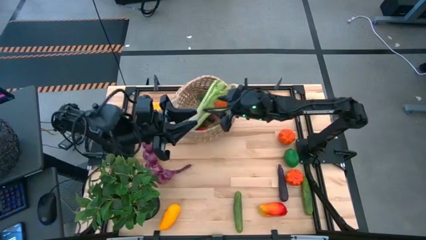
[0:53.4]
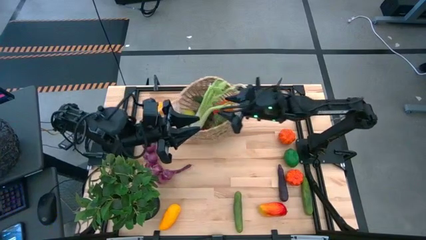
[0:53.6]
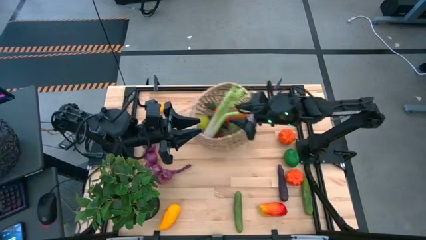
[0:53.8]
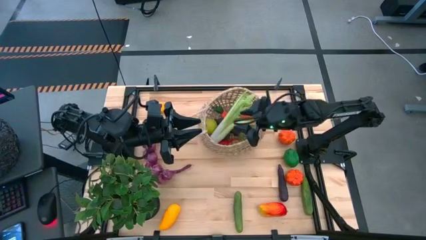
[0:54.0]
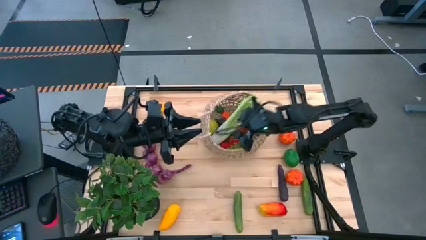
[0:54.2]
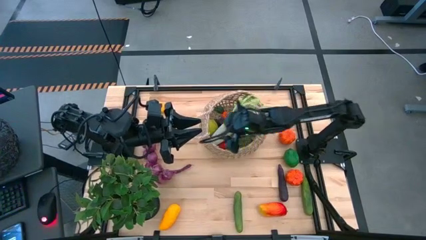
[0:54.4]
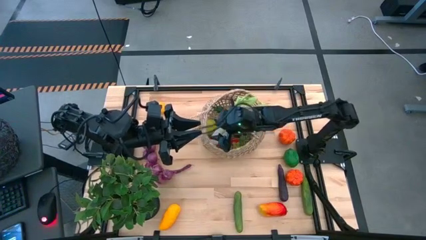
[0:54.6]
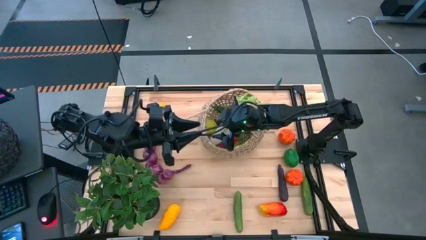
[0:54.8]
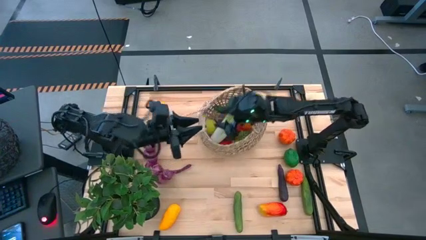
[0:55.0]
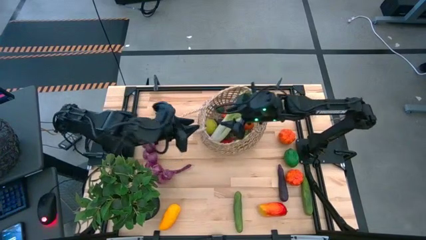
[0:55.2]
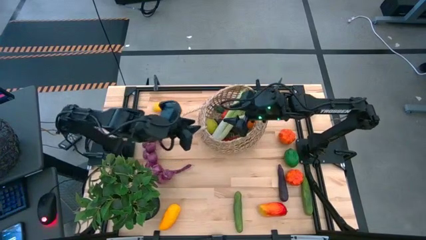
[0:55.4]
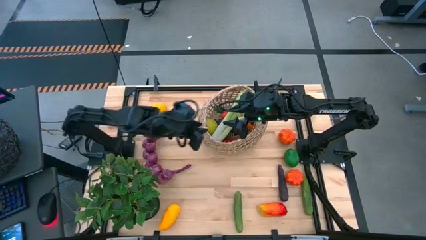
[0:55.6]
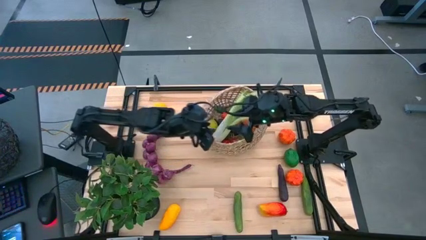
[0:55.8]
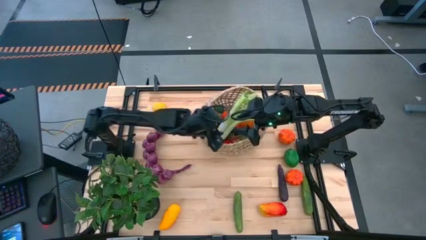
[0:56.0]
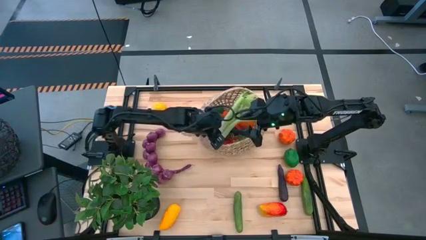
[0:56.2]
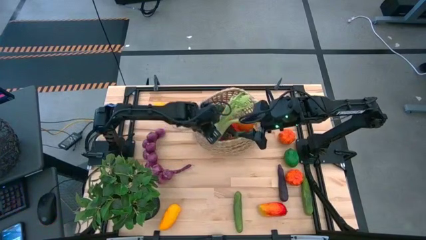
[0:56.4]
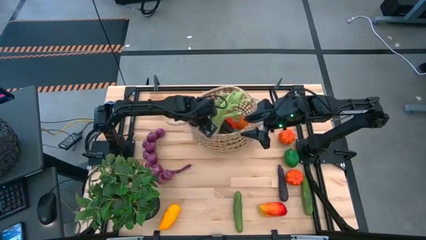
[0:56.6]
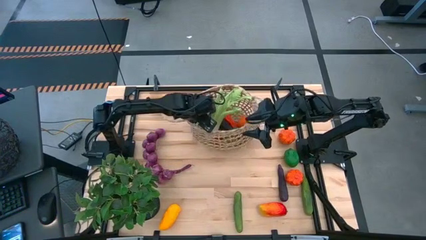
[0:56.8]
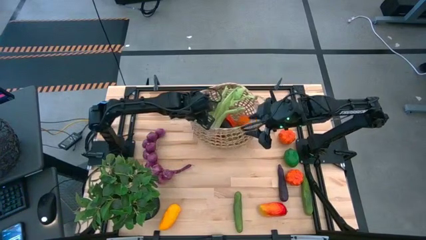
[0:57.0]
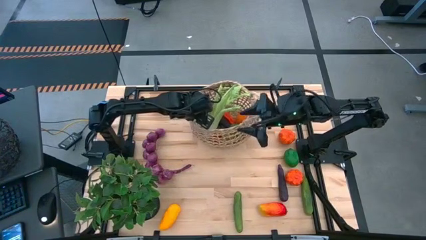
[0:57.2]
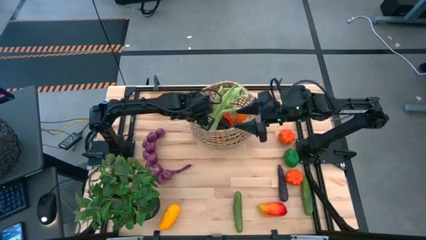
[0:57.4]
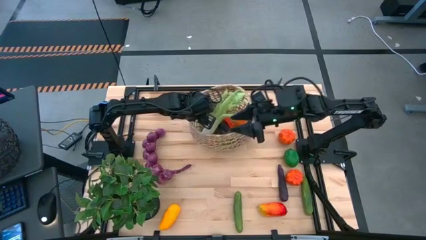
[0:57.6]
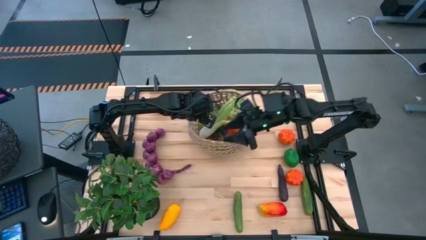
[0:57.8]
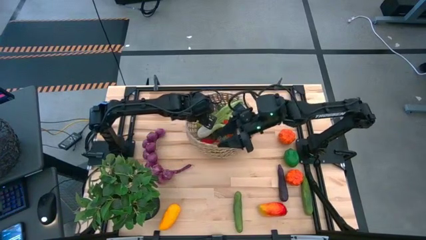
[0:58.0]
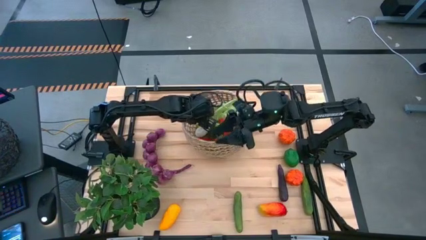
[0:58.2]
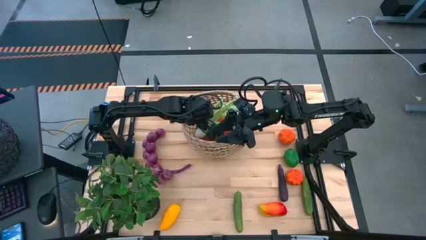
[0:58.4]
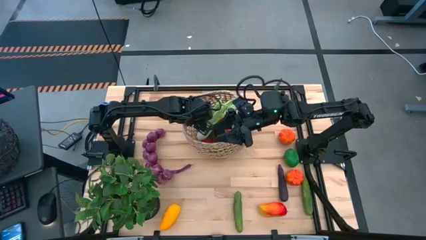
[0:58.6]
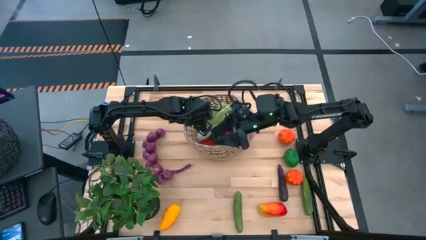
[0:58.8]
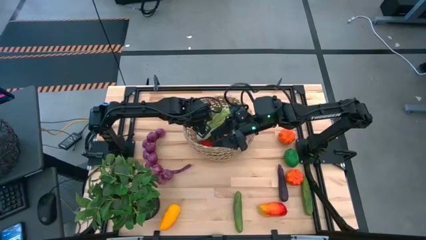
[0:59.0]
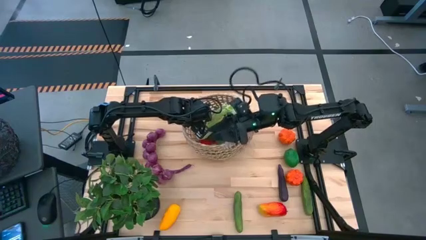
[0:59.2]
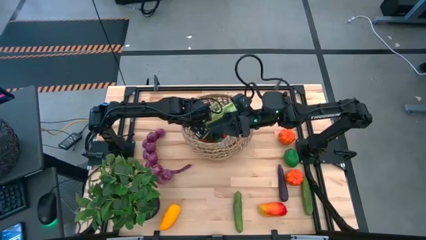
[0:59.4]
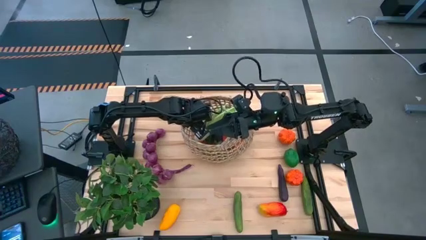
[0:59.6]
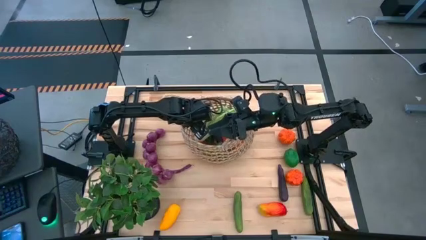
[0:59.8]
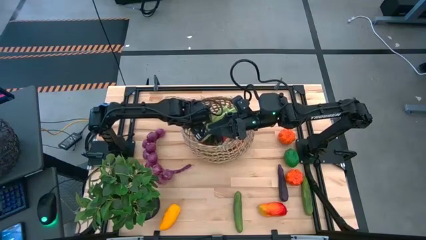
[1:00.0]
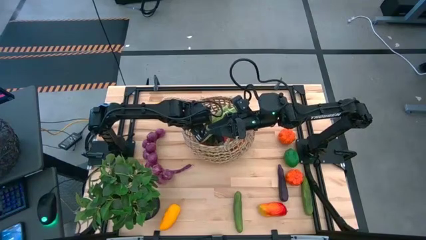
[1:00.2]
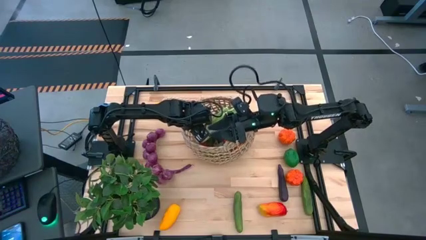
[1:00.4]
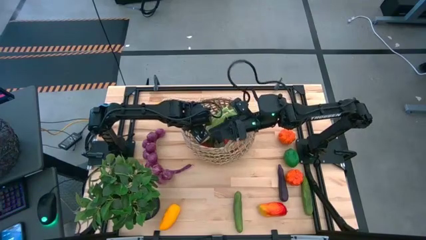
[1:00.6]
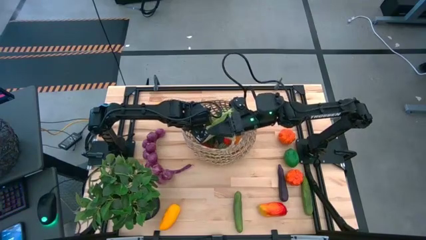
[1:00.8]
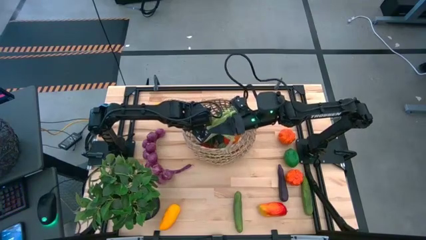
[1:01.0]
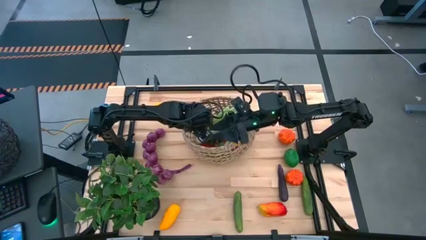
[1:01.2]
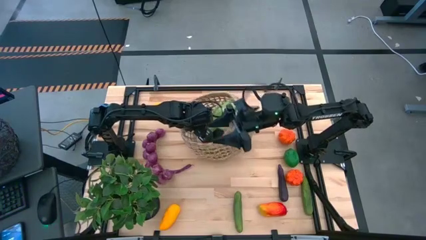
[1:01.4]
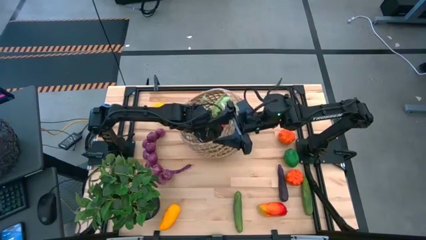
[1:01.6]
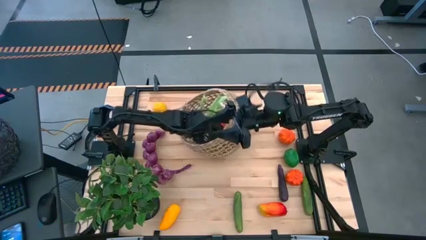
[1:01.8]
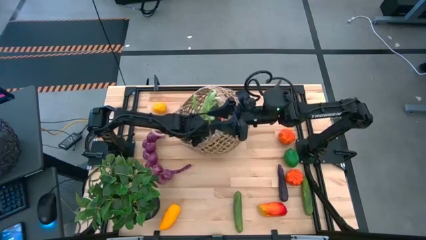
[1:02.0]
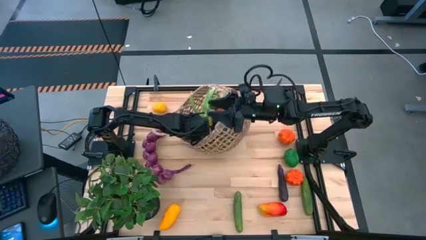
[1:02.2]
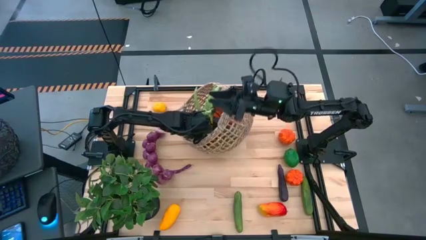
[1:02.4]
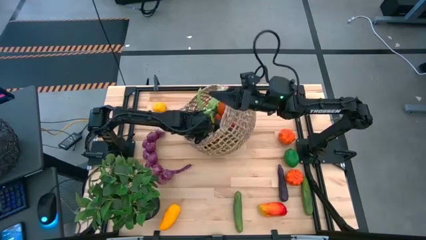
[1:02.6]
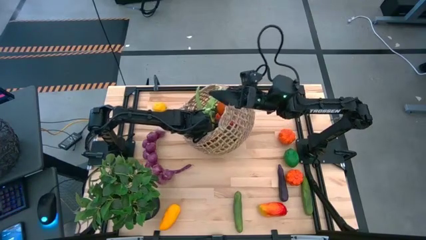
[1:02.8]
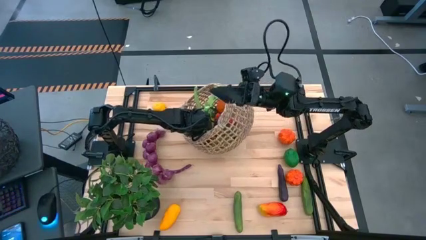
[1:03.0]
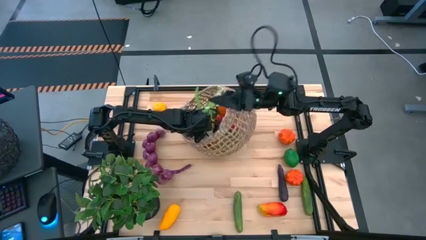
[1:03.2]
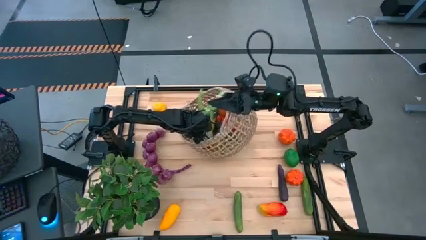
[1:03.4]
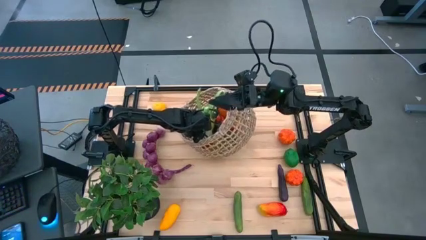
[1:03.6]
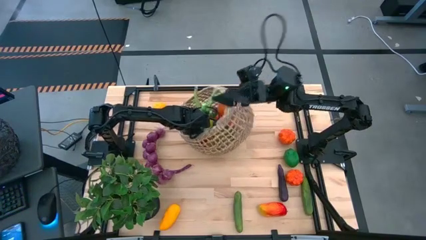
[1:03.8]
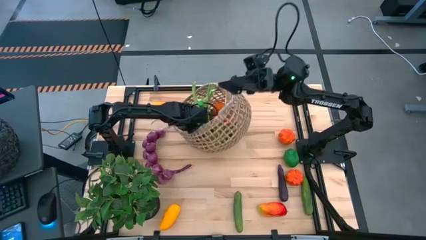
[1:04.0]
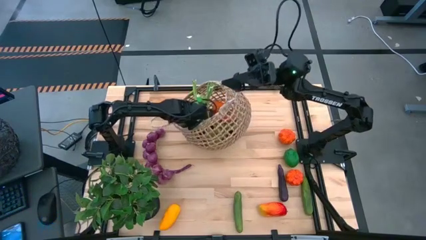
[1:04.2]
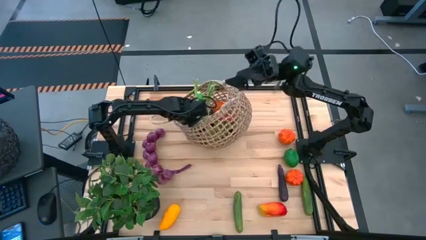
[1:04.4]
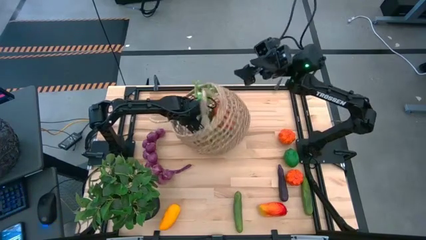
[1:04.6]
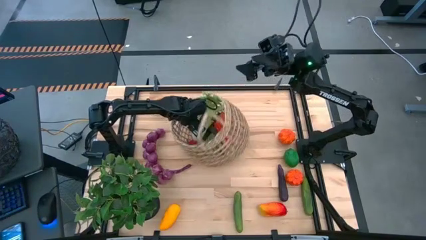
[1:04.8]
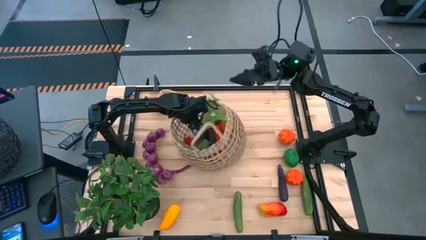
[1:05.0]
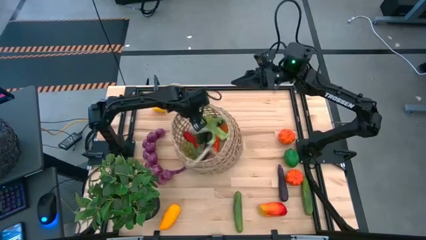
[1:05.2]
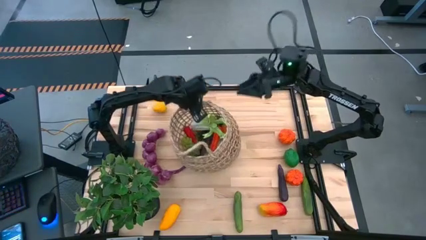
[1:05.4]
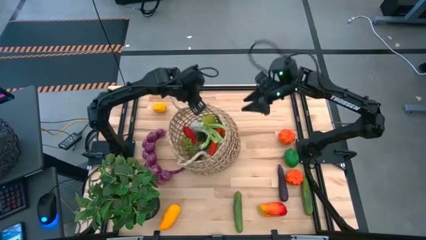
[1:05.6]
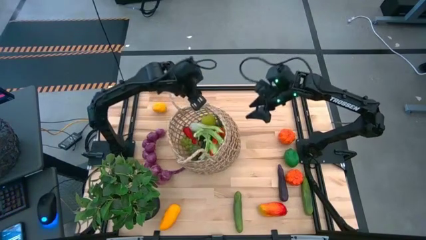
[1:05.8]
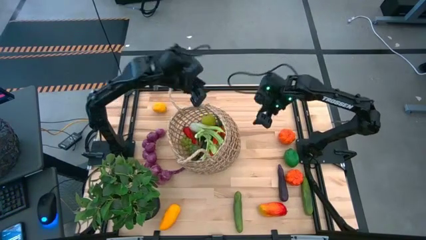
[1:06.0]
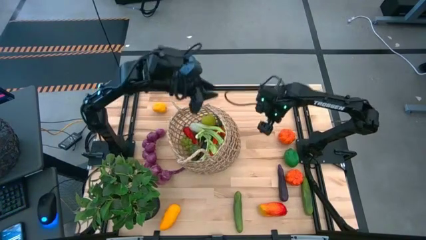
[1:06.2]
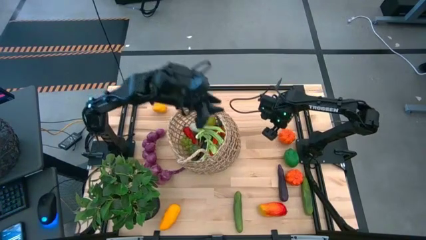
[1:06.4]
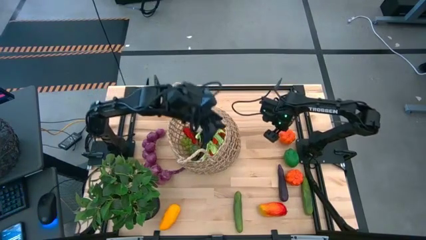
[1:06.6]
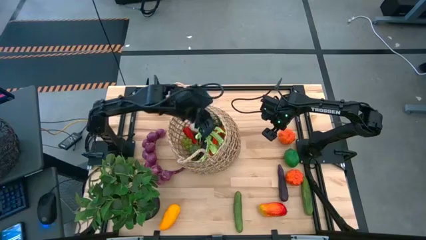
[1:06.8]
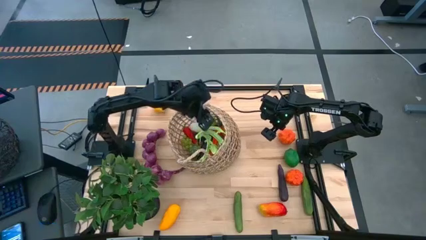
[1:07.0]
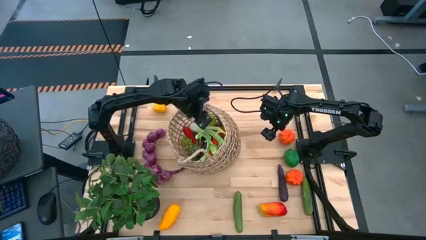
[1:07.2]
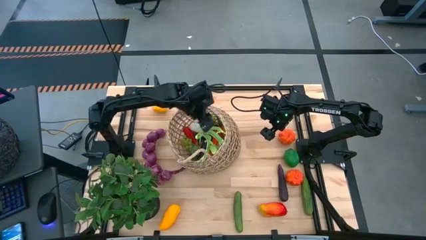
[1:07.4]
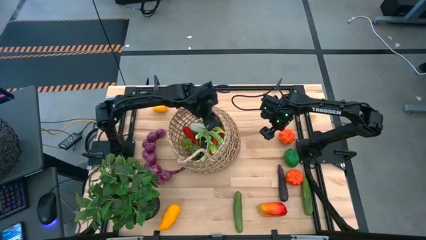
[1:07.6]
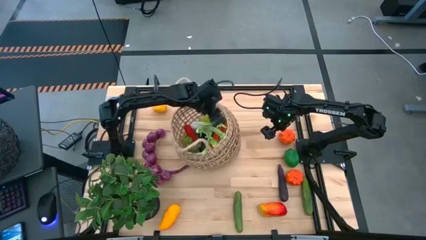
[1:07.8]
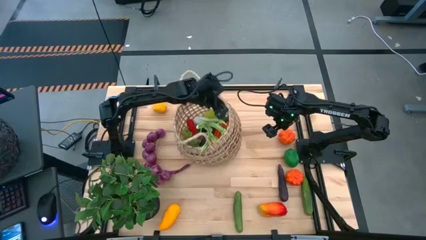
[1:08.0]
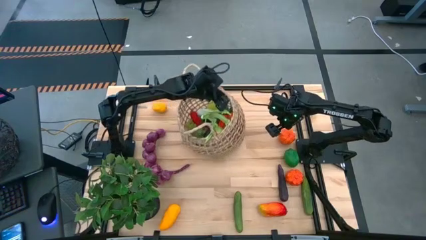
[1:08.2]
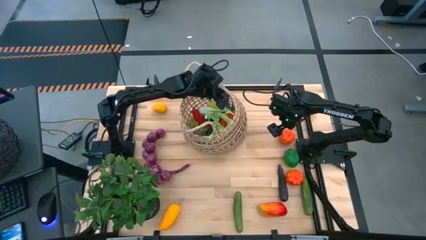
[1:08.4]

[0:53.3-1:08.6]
Task: Build produce basket
Adjust the brown basket

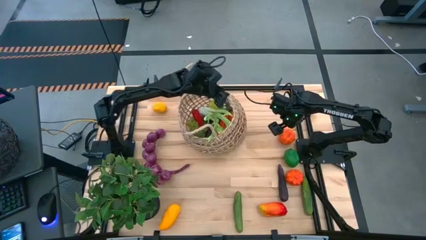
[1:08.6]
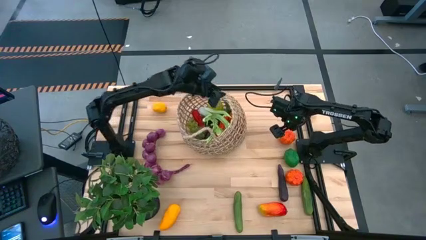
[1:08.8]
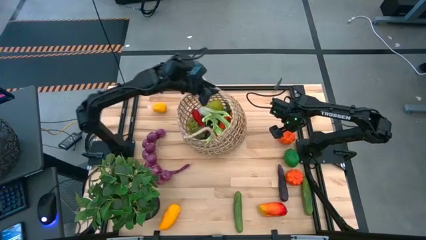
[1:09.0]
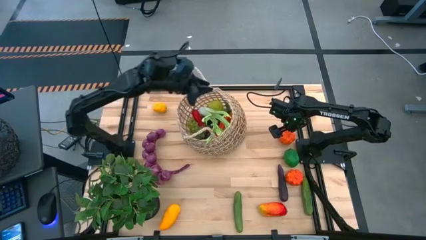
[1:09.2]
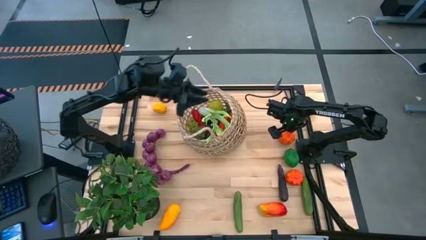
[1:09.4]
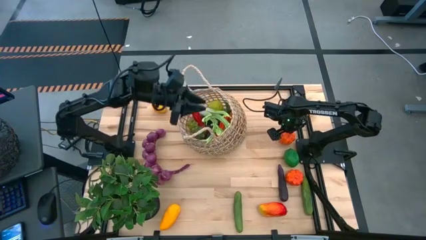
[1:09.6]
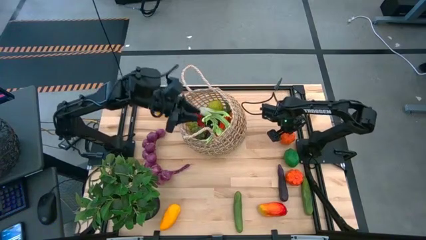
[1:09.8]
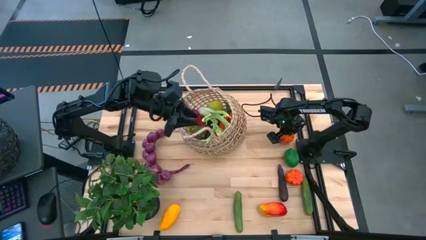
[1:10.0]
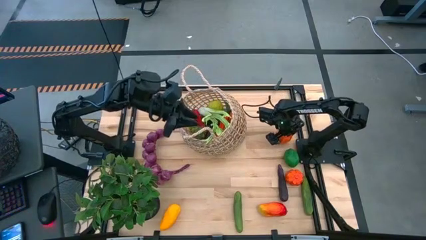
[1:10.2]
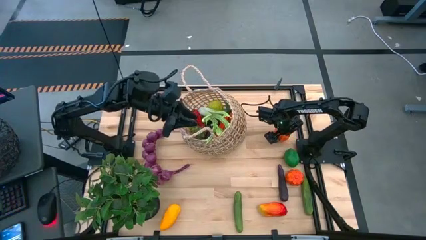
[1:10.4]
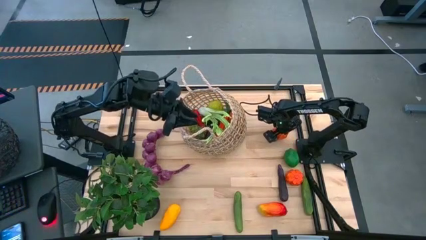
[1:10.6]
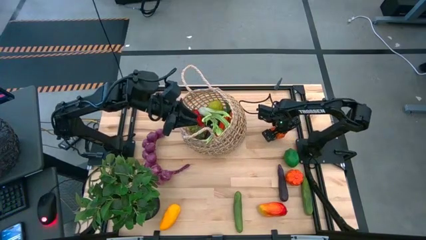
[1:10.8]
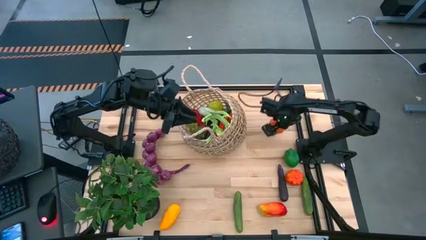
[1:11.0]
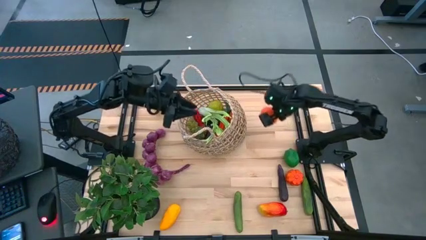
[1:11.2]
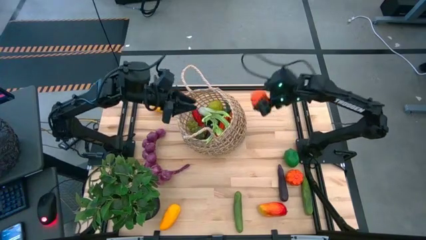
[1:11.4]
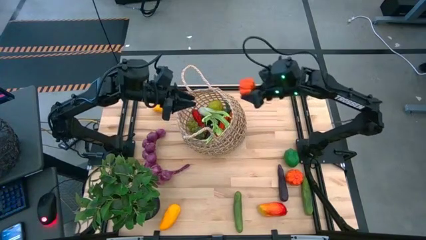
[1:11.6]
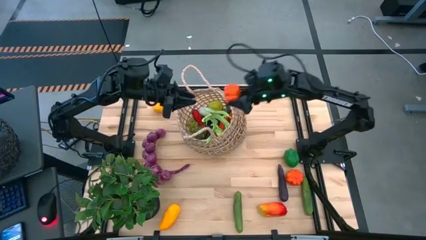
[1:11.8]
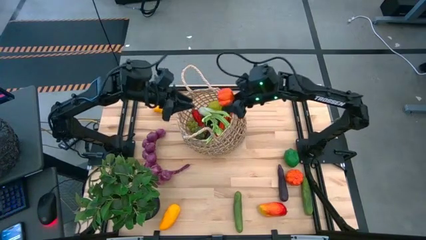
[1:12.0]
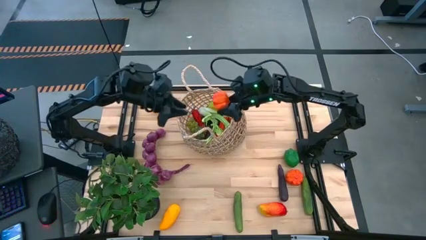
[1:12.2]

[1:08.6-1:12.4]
Put the top pumpkin into the brown basket
